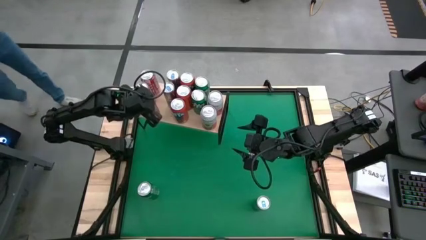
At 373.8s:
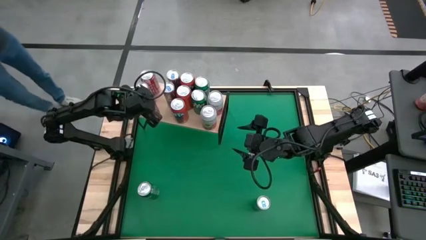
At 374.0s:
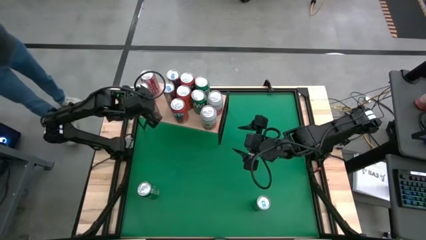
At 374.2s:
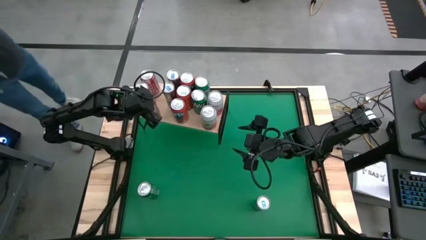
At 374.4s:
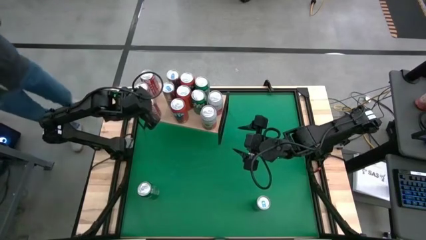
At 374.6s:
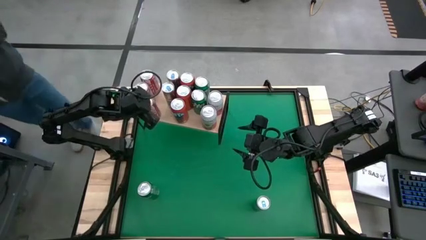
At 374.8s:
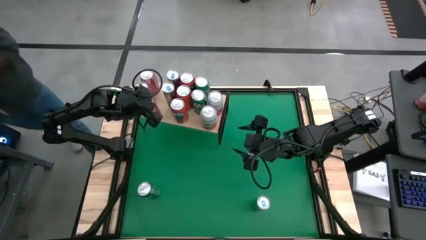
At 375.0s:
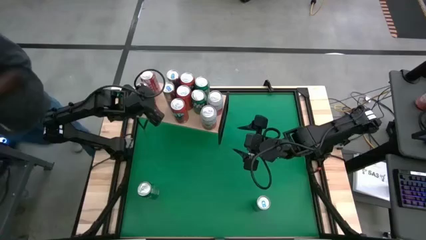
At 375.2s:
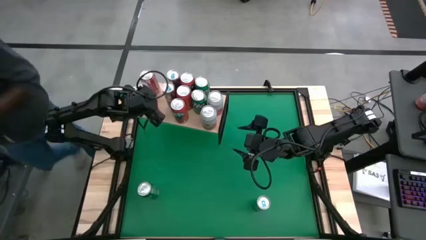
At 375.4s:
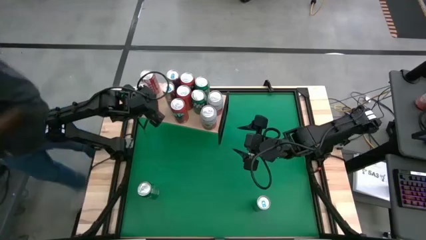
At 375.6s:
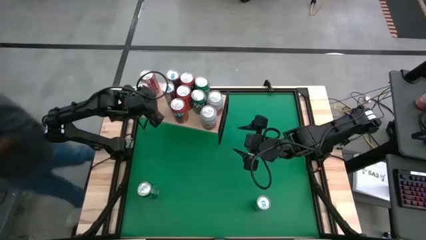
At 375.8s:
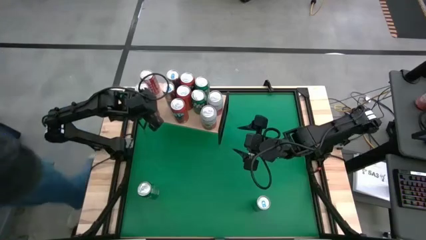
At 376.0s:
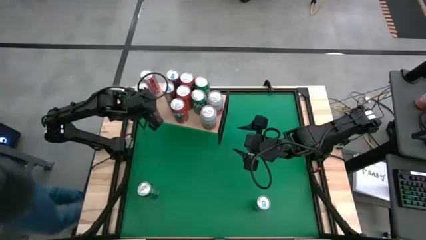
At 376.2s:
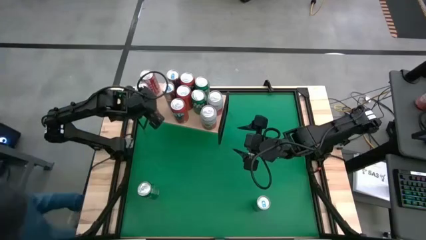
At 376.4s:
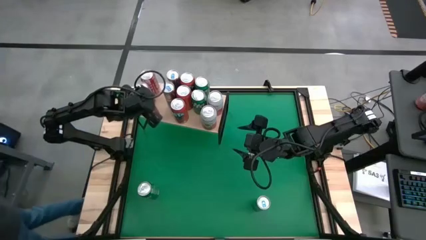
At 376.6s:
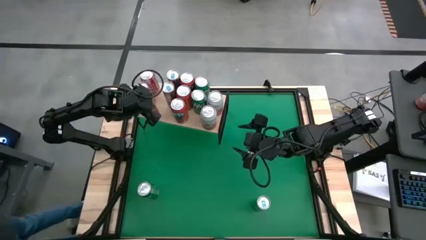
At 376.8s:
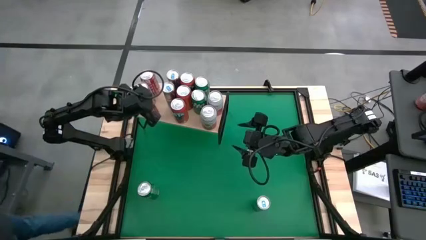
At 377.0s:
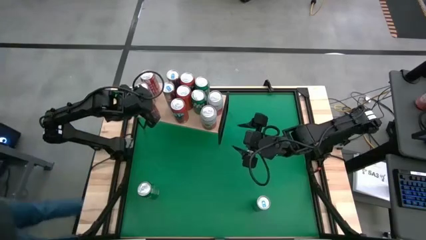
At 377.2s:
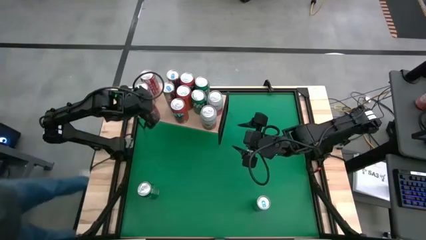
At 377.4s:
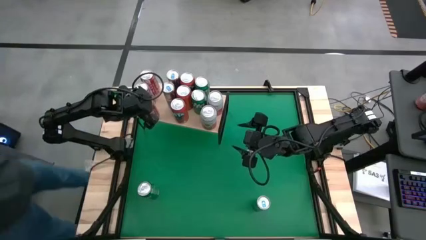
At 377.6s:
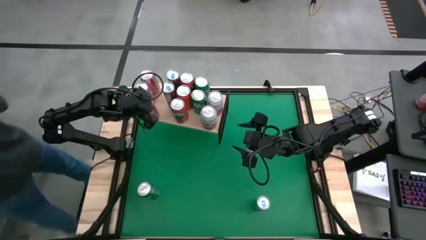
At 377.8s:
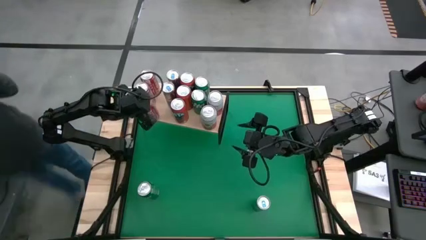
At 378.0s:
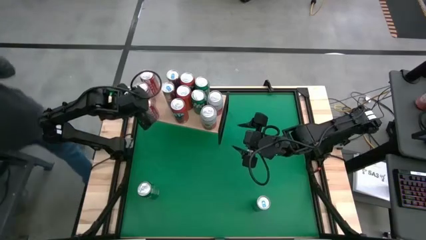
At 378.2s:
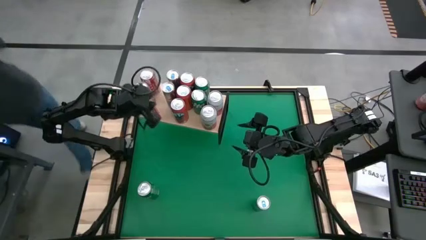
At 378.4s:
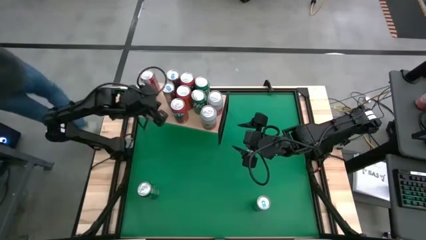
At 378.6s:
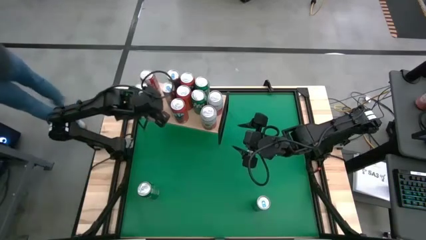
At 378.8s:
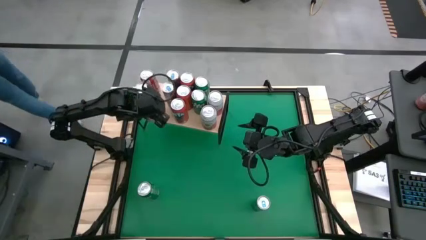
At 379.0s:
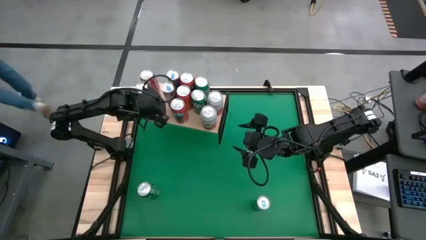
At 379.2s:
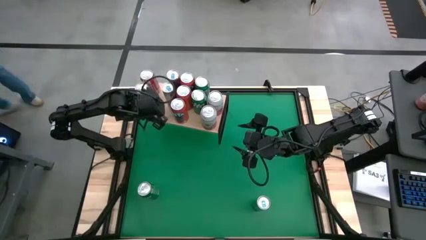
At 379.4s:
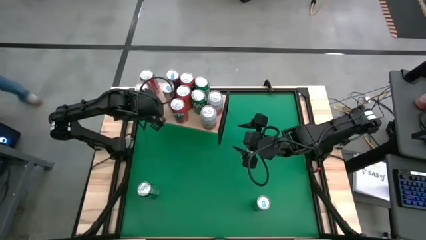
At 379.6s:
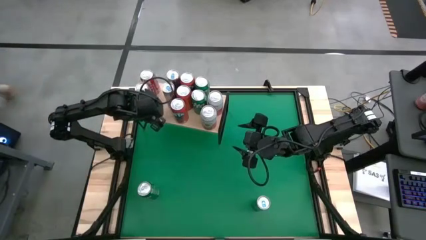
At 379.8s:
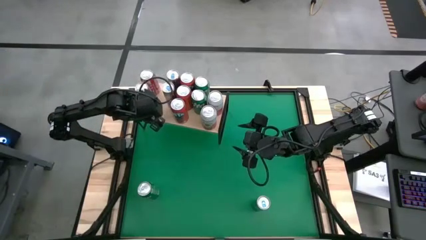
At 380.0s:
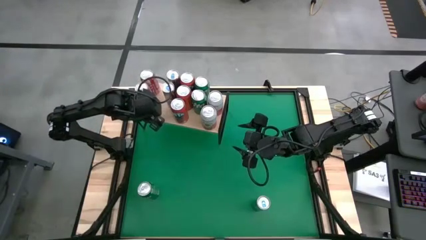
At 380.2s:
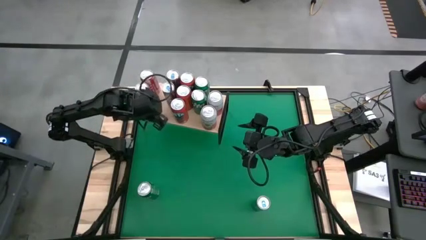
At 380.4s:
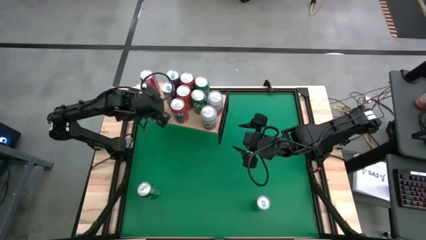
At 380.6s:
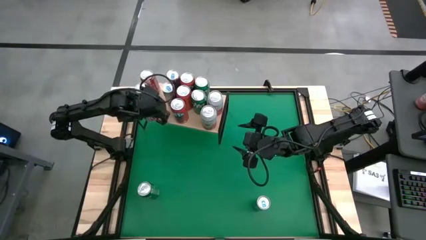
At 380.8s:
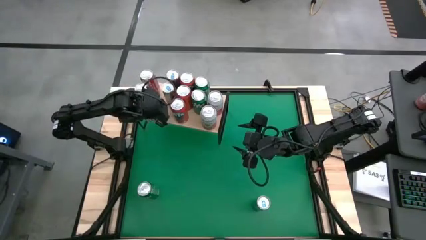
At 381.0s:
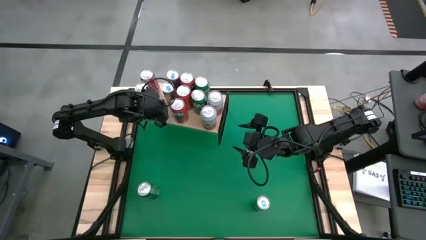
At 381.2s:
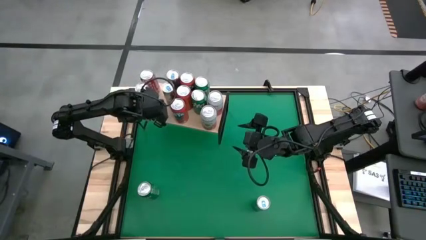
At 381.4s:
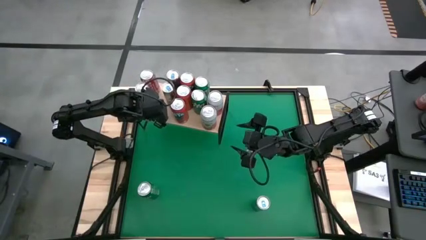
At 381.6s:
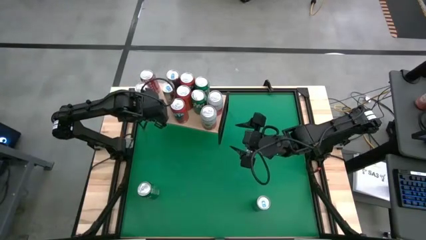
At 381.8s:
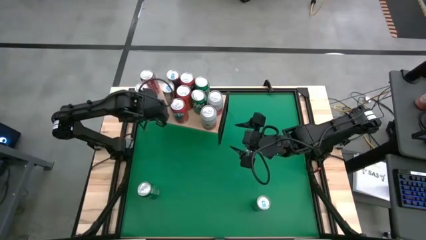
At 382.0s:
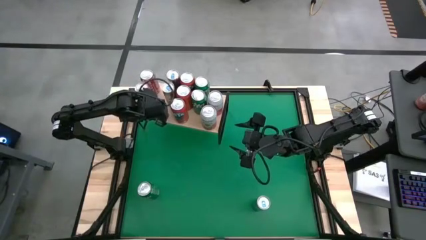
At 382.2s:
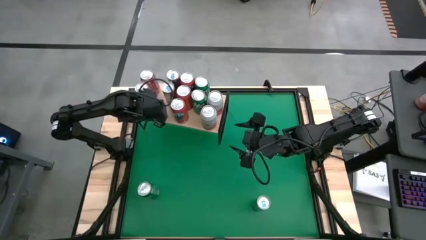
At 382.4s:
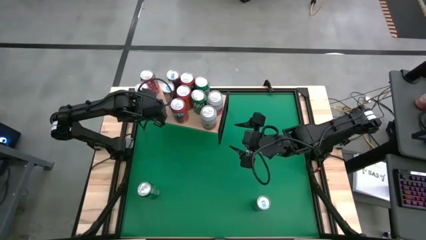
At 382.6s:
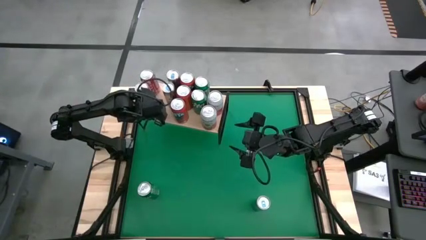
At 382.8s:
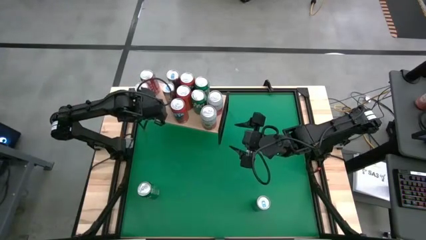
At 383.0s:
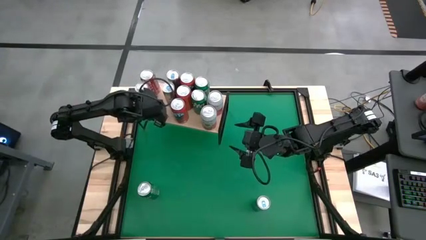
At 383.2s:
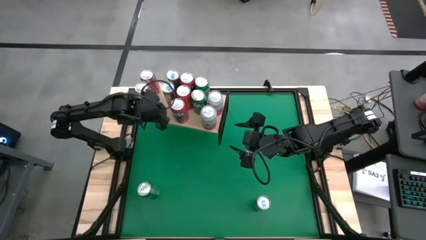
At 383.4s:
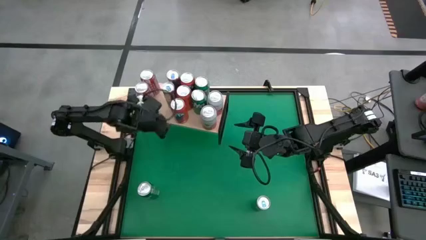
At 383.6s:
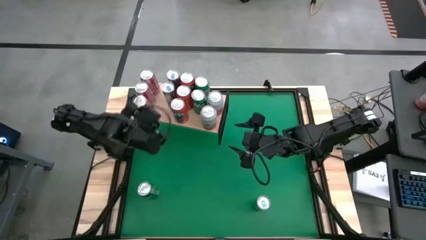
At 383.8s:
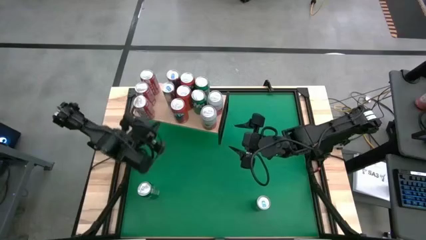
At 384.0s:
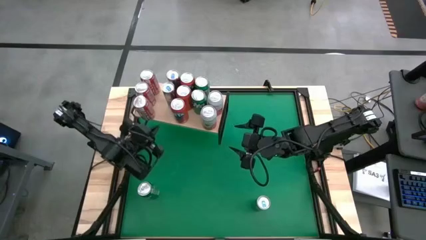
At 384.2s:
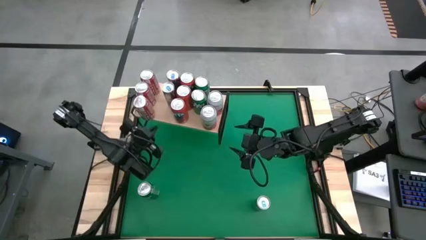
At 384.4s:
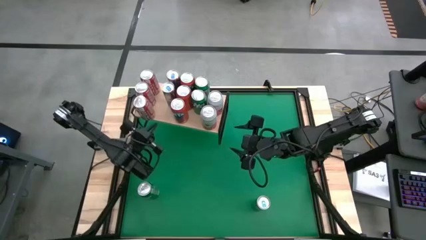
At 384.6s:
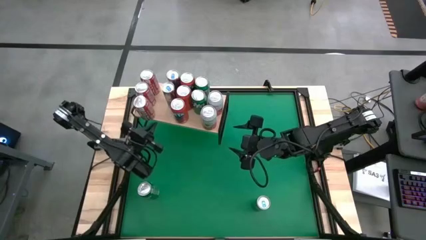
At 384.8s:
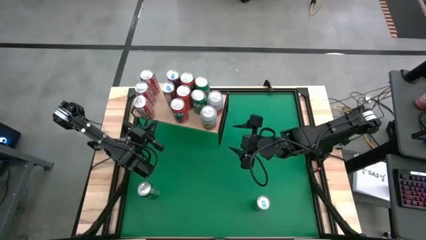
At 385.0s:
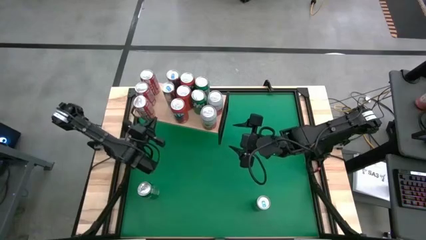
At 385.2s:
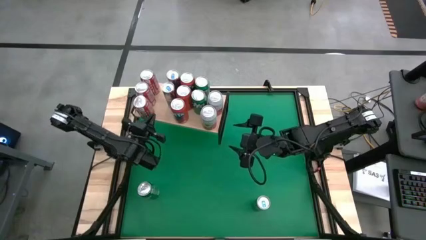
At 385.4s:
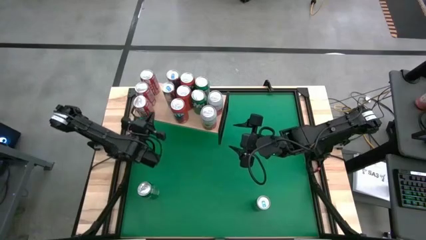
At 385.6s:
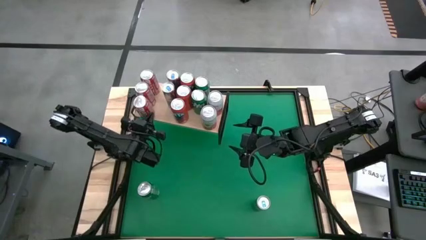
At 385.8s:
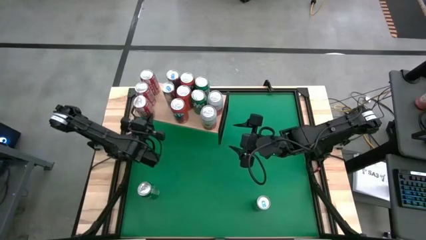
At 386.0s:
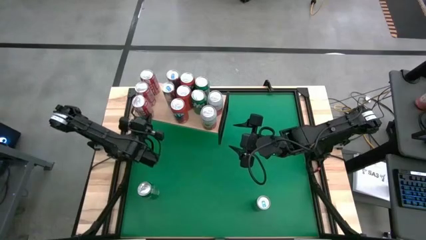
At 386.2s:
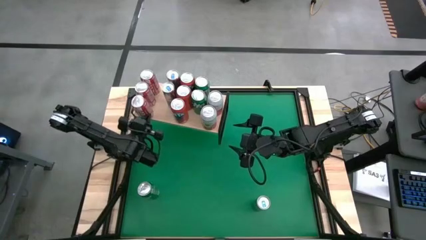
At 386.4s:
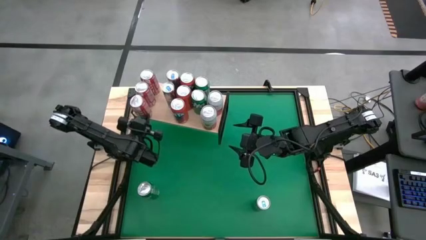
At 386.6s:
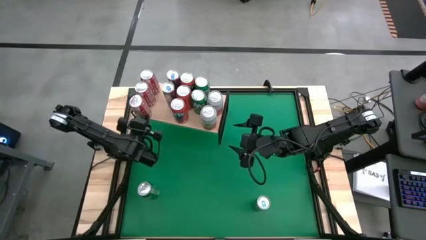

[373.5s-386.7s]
Task: Place canned beverage on shelf
Put the red/black soda can on the shelf aligned with the other red/black soda can
